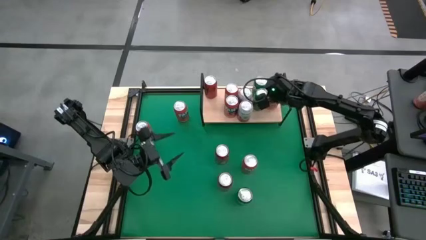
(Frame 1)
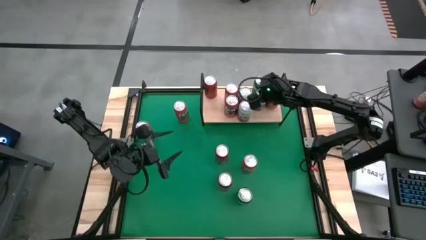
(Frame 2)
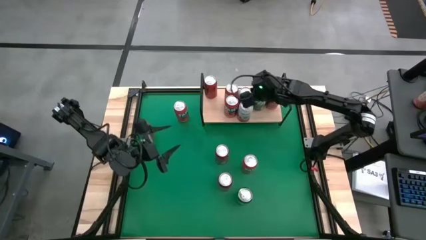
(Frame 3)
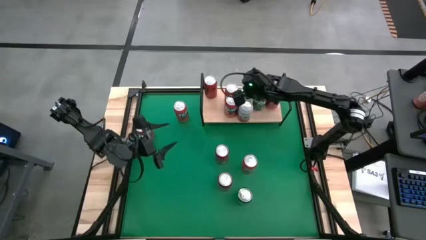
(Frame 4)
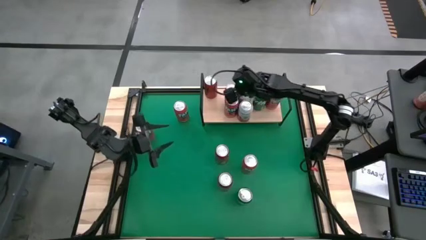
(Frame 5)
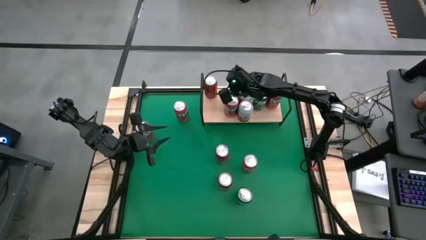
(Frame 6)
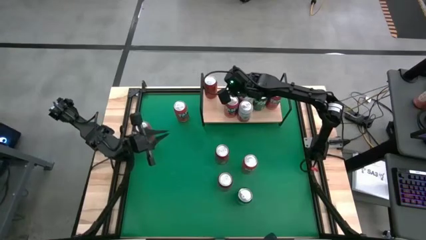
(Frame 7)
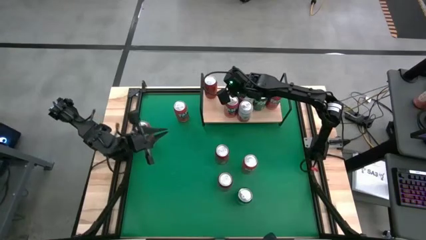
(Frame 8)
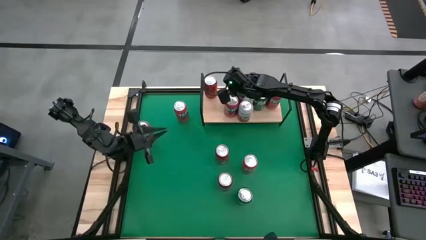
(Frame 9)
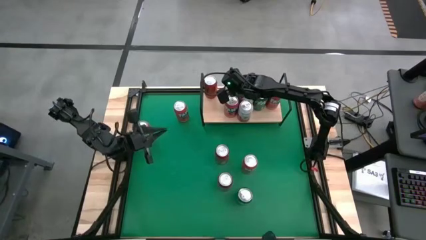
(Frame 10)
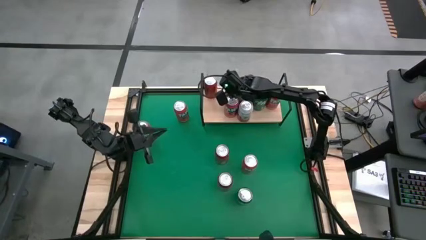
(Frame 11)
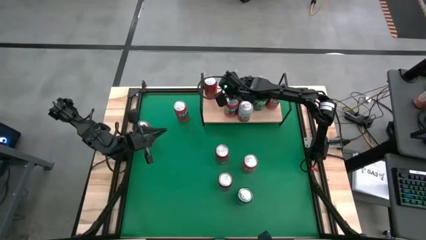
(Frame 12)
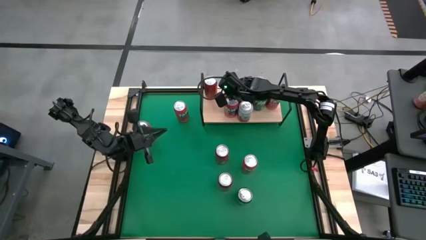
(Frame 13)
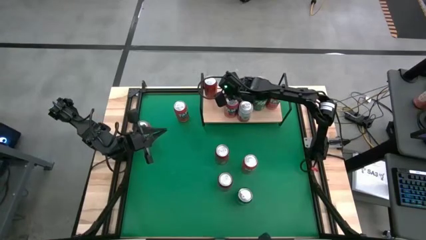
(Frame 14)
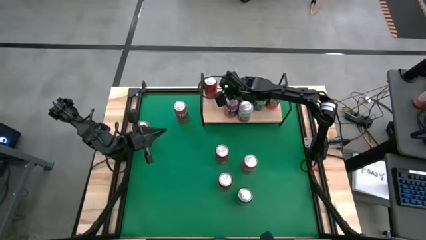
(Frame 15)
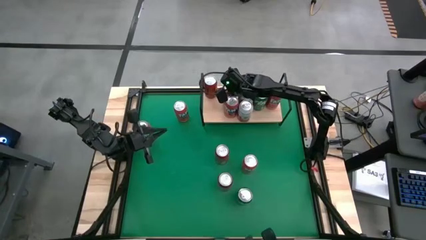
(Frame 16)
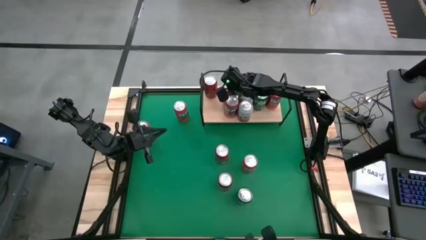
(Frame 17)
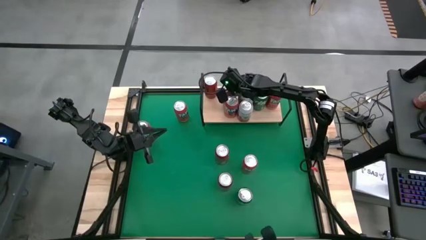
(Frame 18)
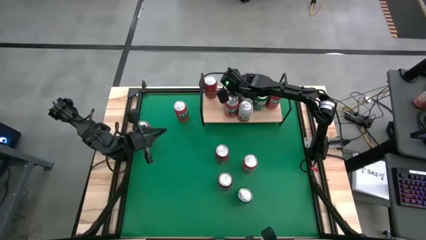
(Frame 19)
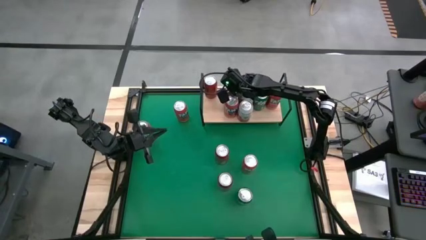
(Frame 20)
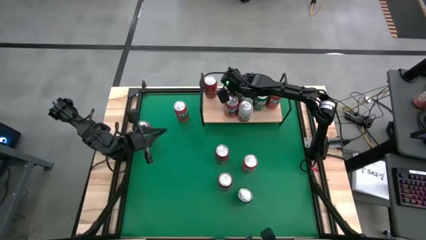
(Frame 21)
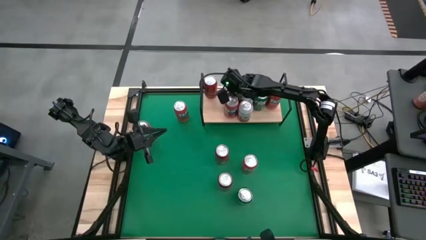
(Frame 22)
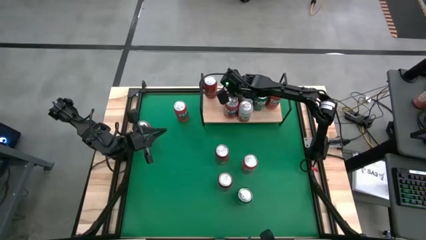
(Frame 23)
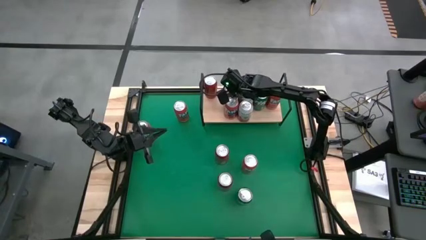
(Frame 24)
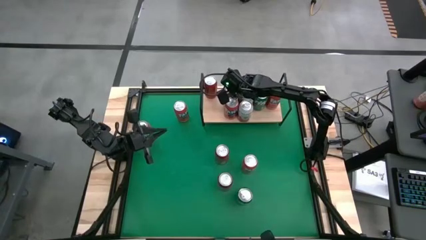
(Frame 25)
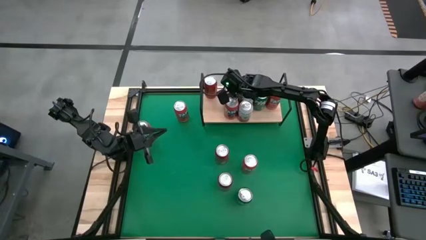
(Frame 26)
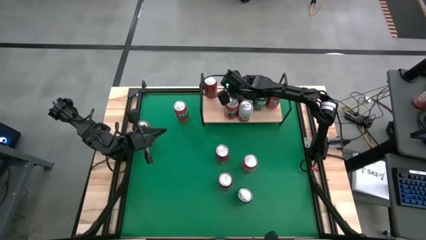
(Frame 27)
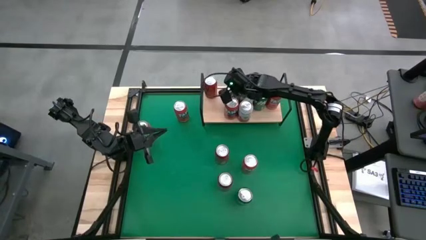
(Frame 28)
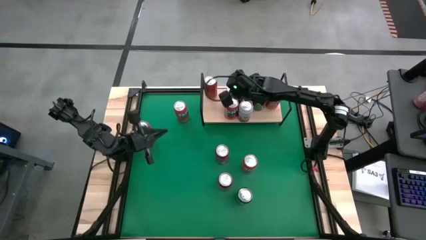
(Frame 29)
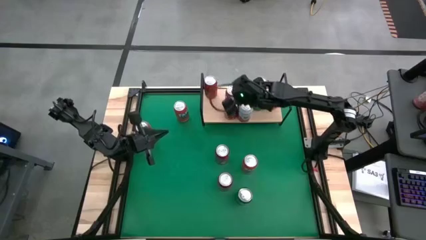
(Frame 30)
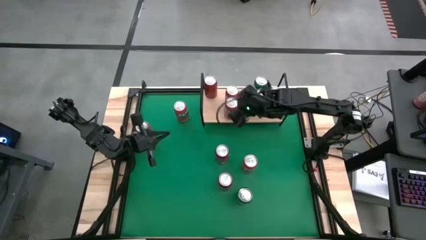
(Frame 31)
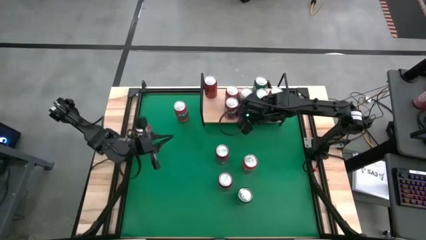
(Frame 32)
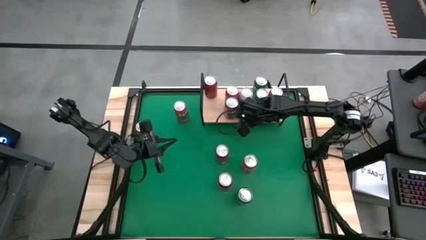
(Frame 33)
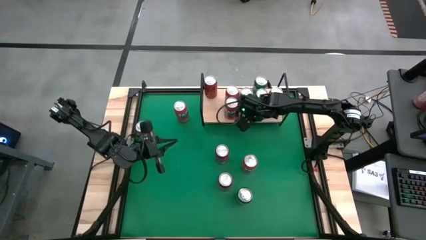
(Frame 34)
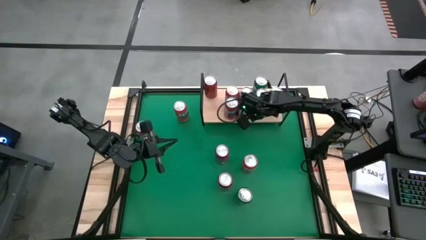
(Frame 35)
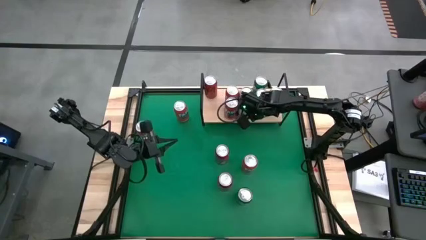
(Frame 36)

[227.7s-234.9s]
Task: Place canned beverage on shelf
Adjust the soda cans on the shelf

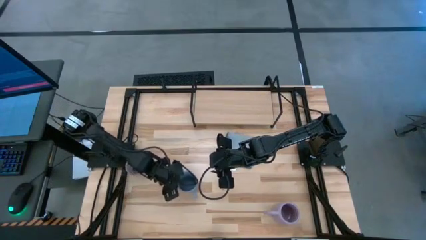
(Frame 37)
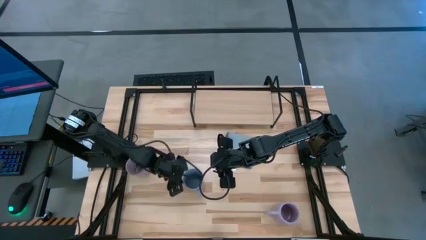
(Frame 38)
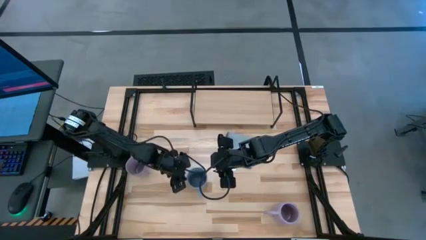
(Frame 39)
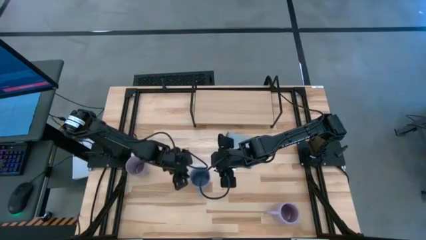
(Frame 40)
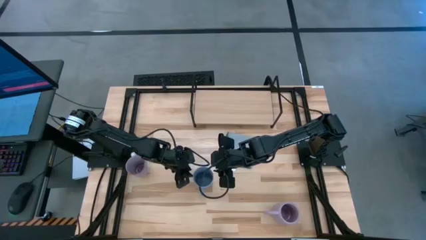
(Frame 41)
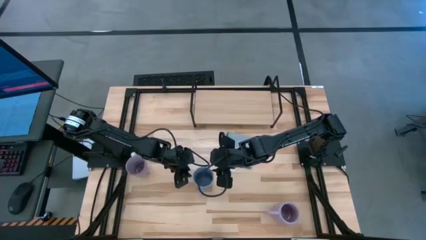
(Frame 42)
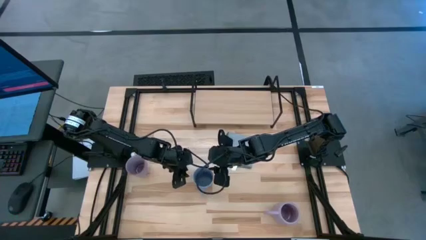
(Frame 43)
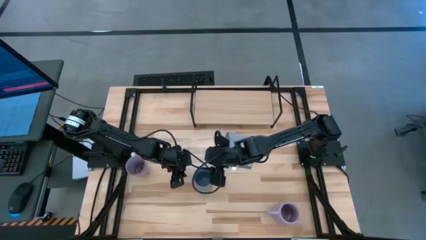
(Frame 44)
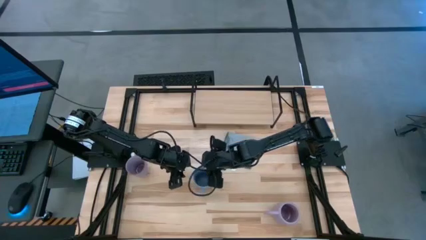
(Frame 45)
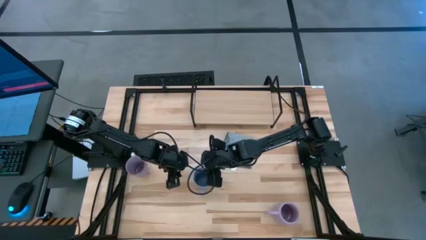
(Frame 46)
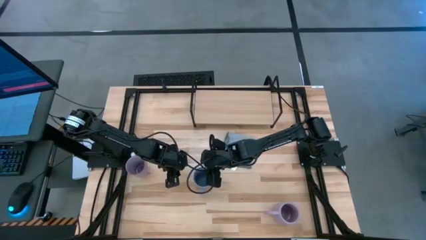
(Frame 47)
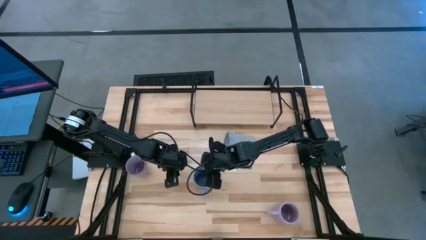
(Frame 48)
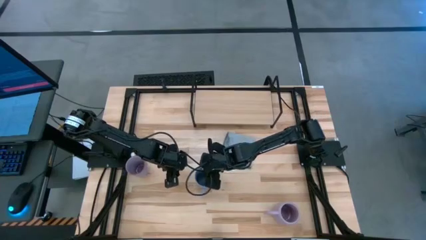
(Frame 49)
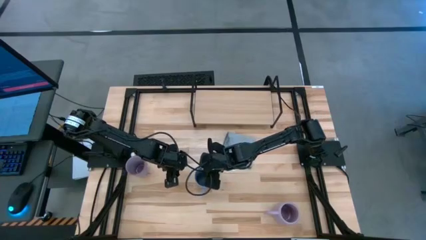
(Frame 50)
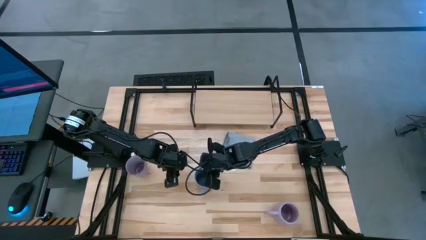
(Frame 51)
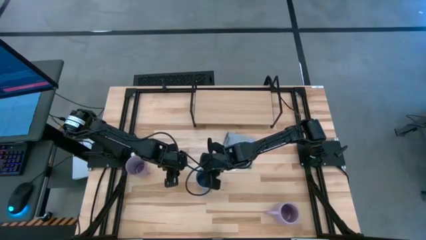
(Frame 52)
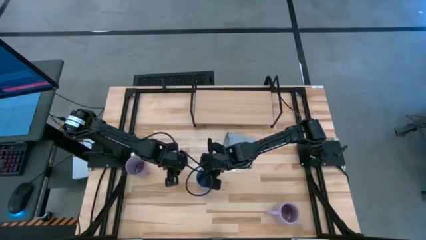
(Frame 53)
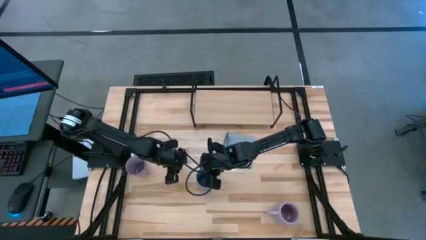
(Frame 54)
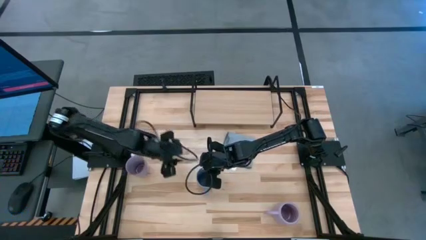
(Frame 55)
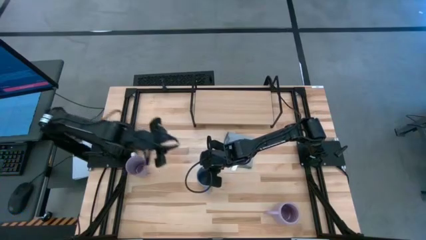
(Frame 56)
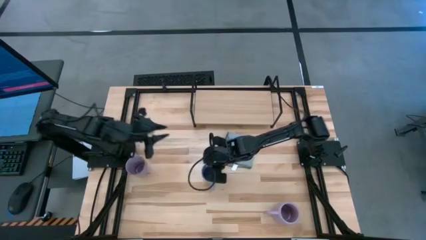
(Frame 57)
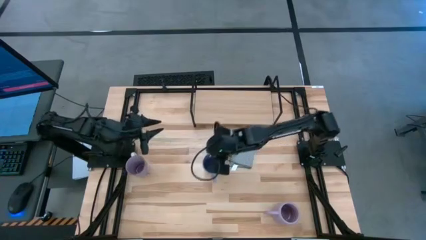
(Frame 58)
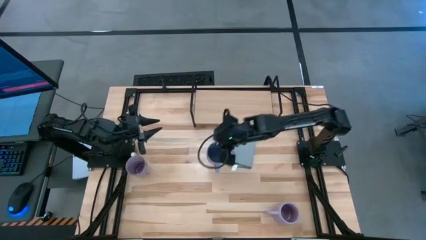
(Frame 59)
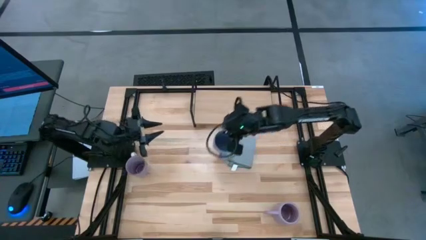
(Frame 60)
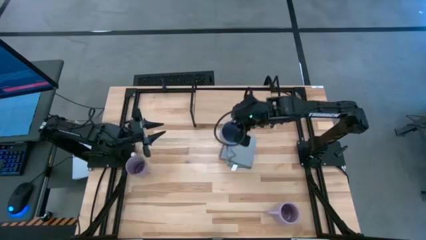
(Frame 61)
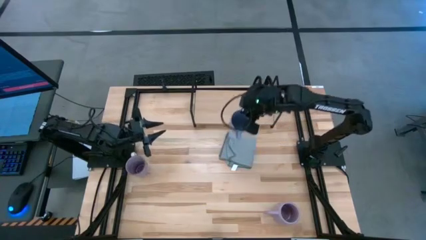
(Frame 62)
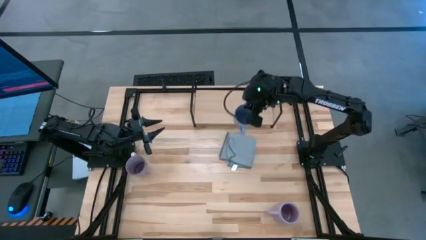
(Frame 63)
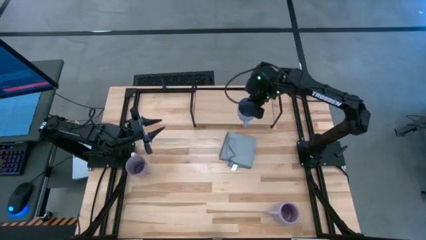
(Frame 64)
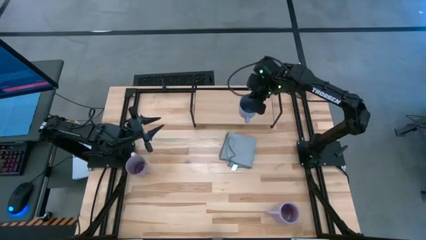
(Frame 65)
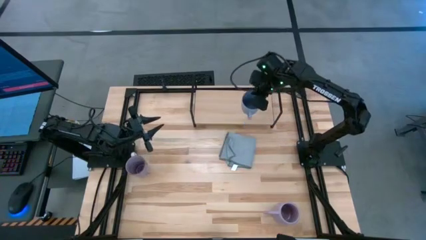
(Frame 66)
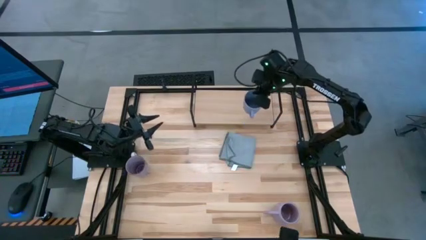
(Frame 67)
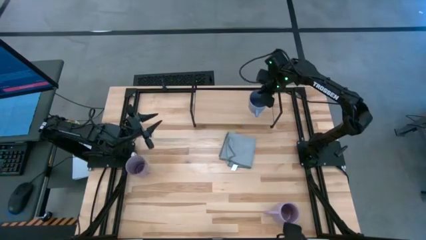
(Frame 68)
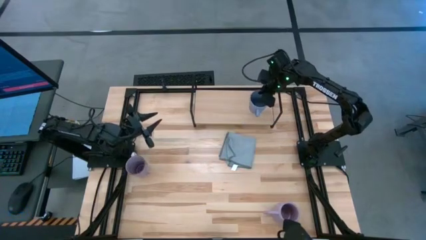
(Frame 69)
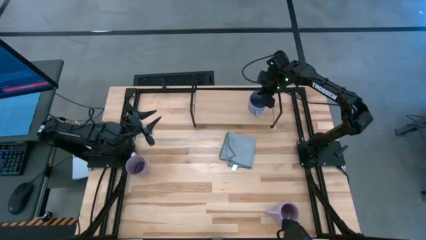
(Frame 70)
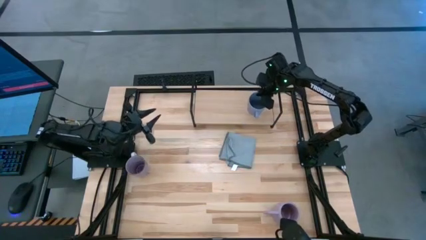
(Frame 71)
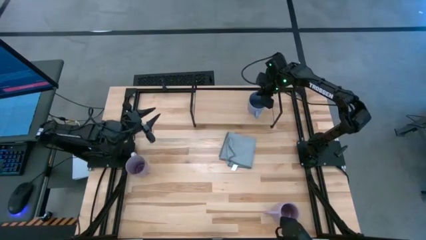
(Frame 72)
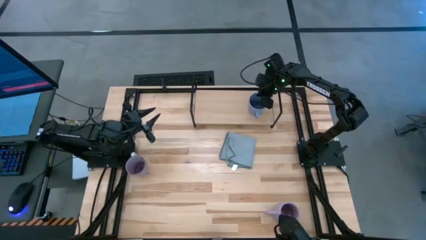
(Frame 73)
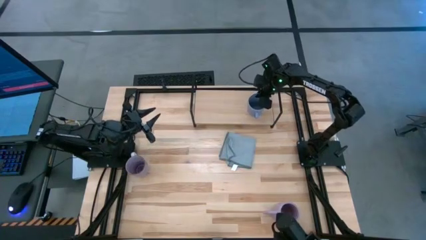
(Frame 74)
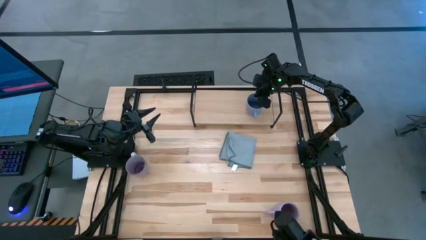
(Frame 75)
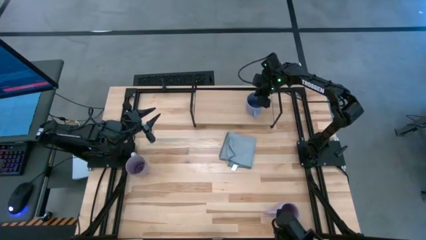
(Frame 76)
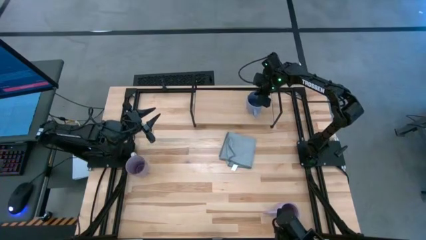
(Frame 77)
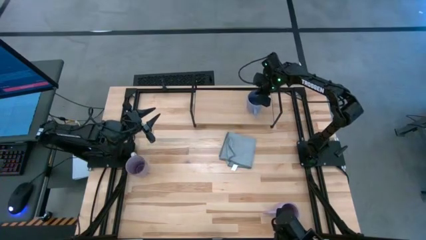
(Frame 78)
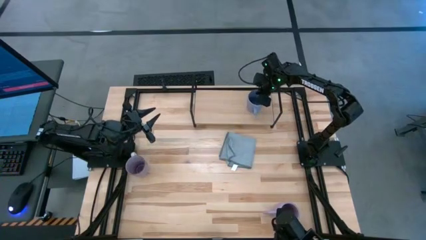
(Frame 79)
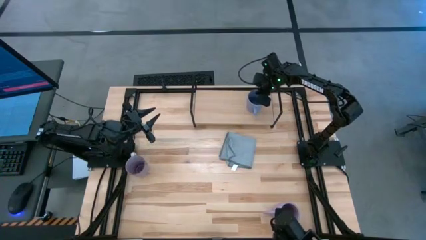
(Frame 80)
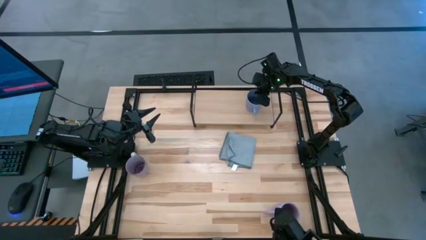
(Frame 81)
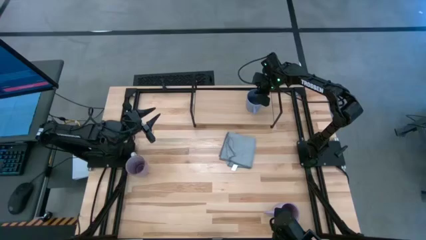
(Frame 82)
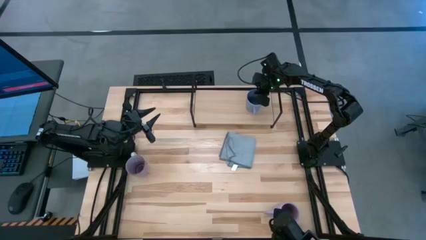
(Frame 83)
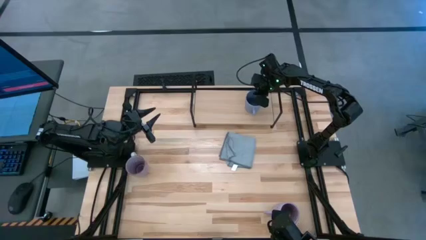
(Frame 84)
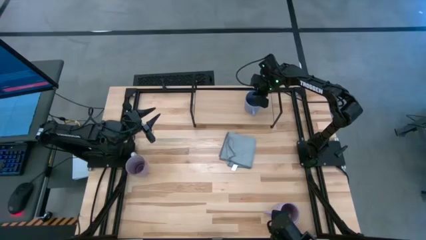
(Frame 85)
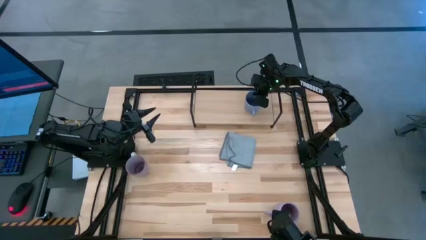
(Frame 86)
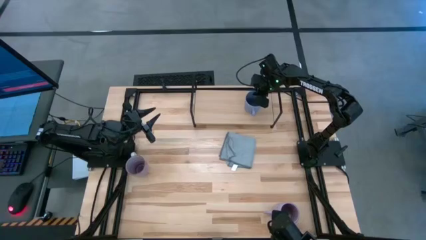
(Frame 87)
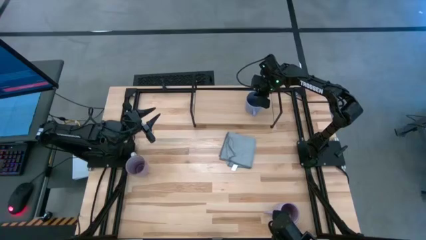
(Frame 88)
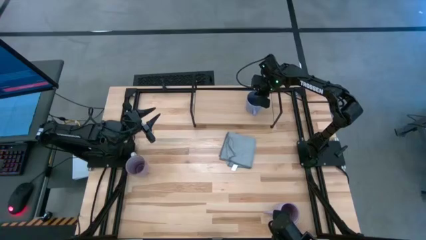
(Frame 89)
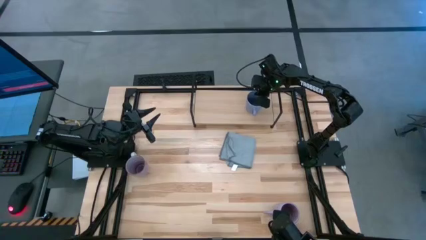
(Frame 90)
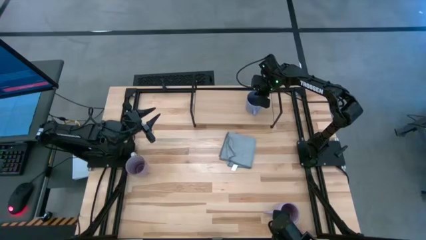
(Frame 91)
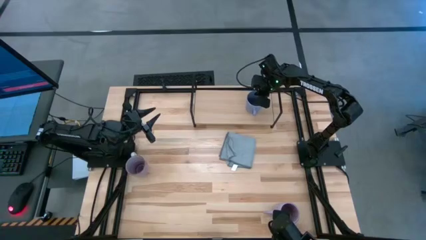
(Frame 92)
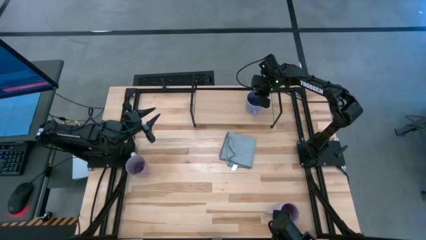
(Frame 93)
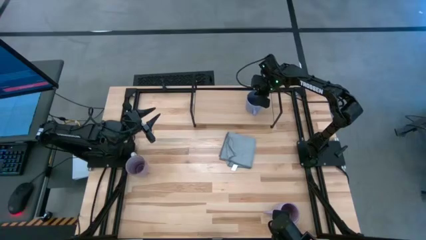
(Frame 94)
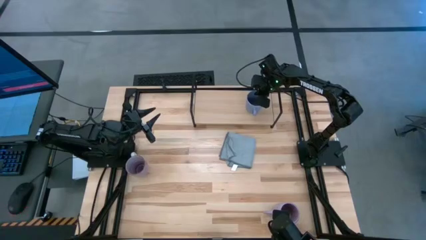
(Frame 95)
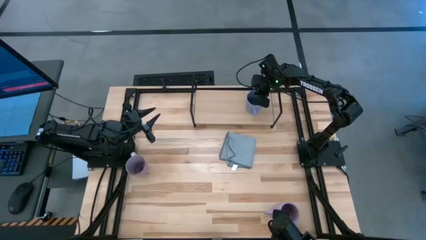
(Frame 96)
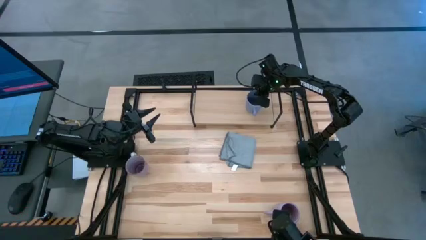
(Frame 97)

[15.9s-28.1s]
Task: Stack small to large cups/mugs on shelf
Put the blue mug on the shelf
